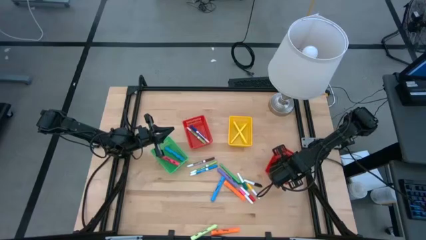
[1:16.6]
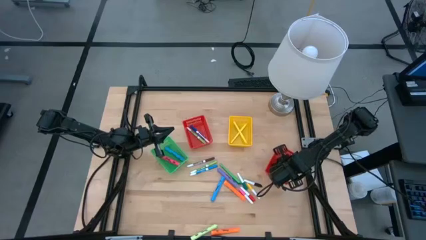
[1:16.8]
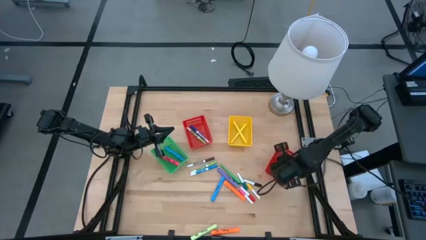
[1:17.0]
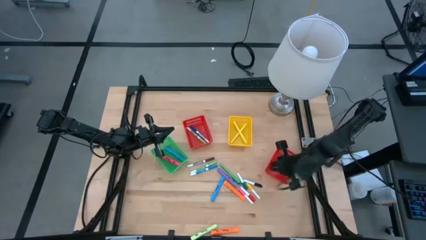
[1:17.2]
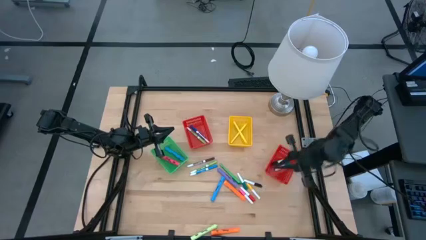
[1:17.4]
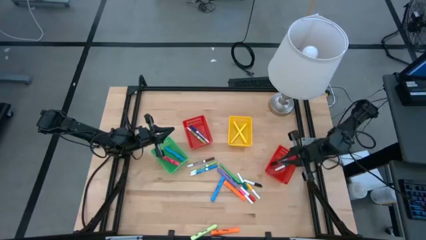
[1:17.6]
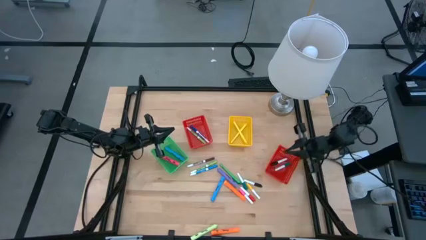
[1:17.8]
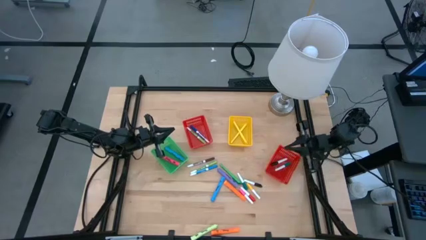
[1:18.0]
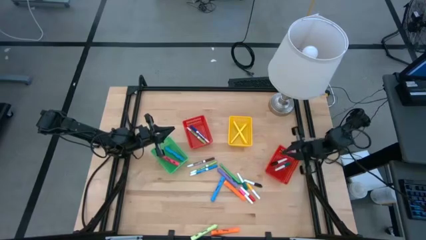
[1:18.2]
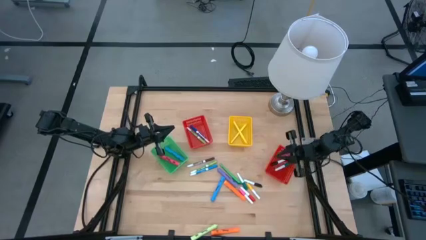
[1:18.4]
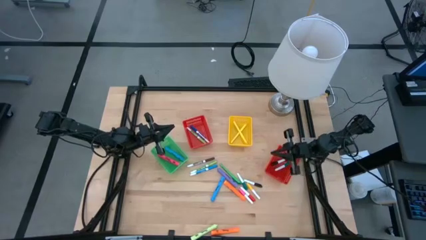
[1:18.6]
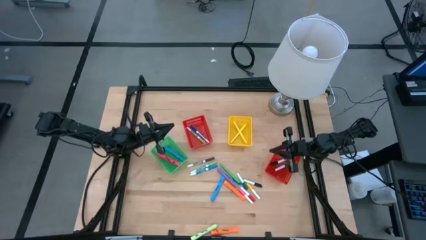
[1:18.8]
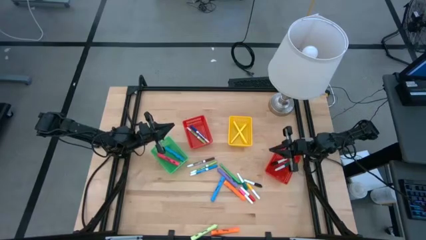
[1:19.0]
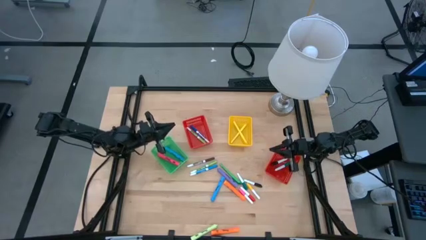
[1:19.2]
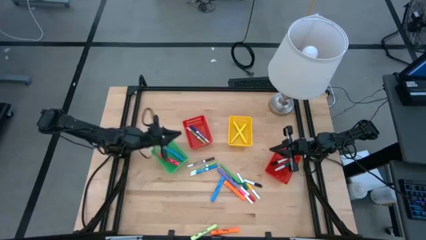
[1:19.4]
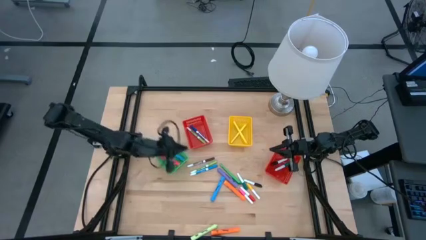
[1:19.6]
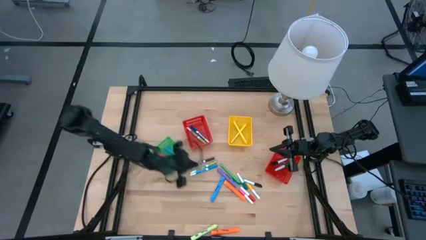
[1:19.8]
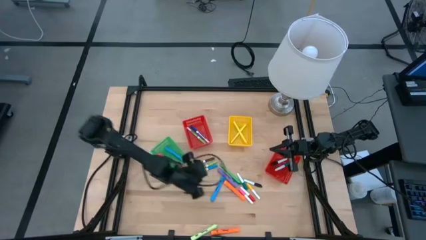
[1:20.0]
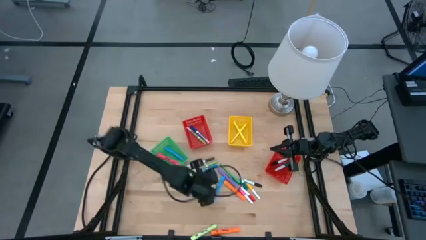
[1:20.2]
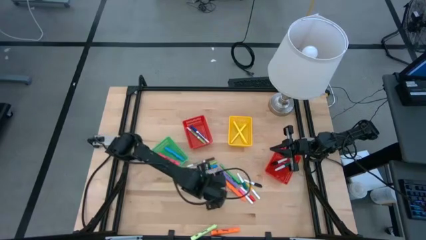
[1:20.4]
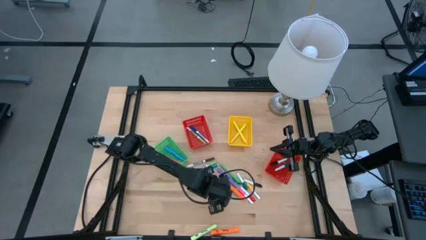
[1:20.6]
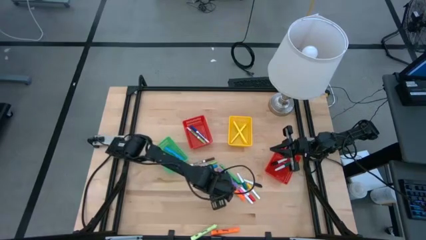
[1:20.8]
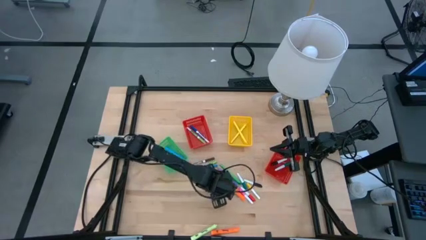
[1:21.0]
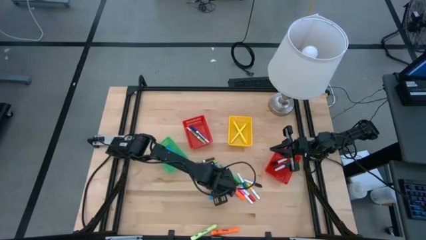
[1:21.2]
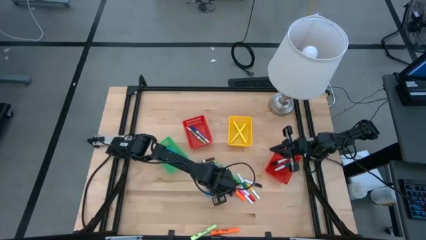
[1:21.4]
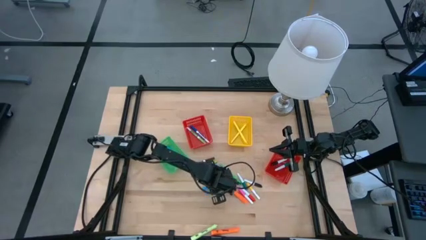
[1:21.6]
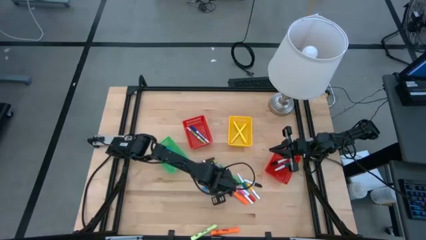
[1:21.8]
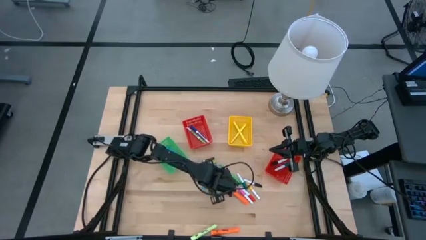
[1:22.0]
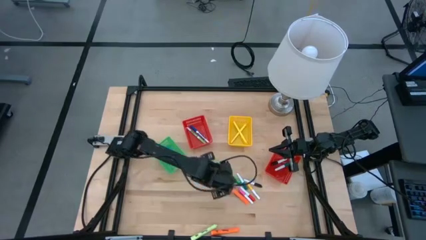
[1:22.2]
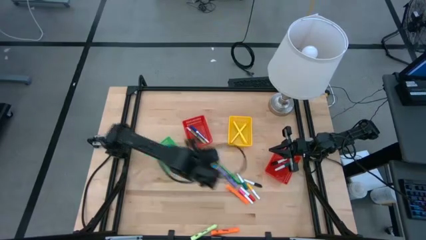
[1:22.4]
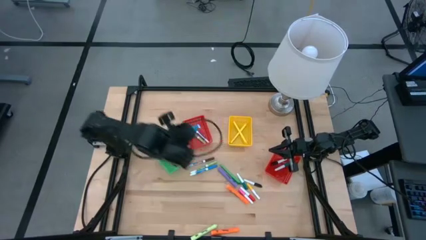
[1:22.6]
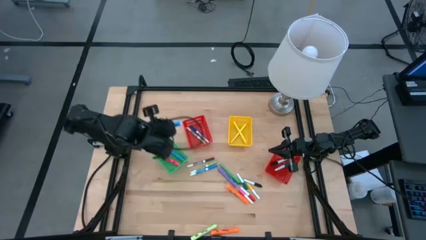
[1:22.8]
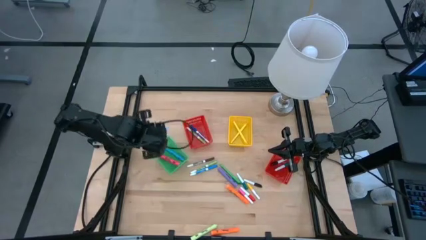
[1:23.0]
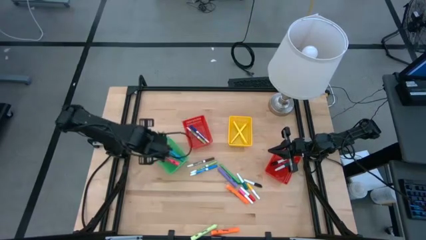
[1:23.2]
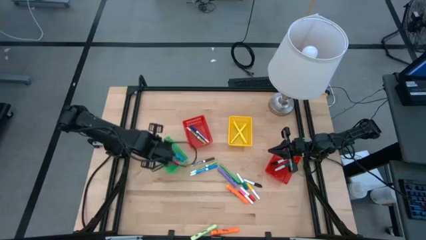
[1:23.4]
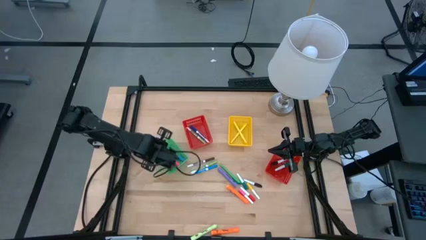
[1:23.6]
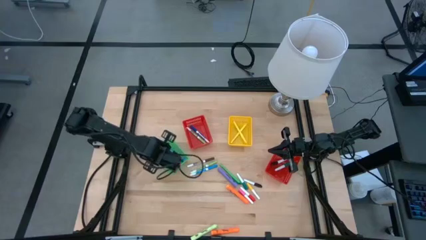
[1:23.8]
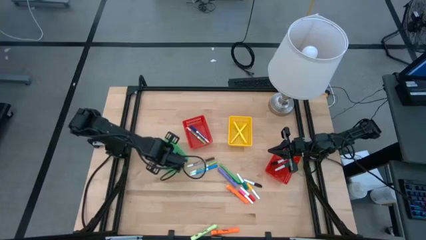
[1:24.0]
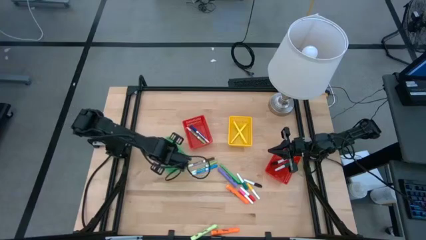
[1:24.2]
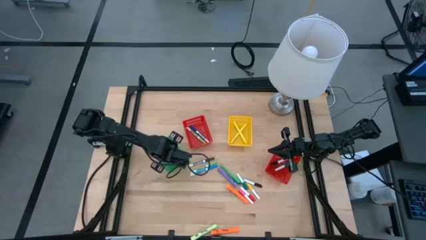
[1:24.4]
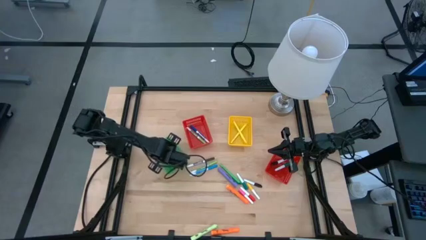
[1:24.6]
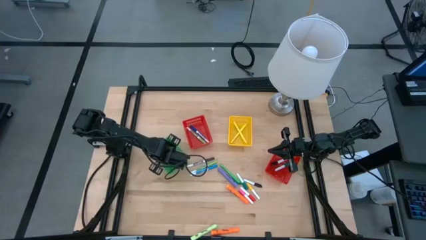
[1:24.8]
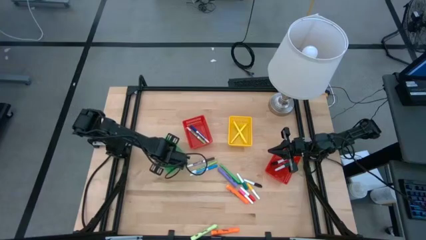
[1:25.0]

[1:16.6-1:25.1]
Task: Pick & Place Markers
Put the large blue highlighter pen into the green bin

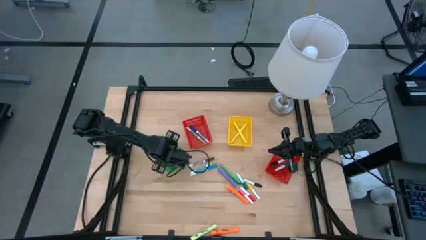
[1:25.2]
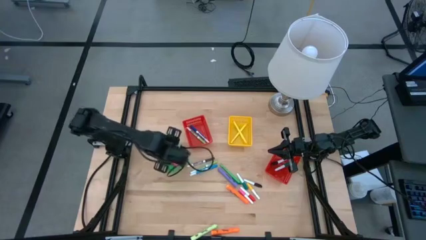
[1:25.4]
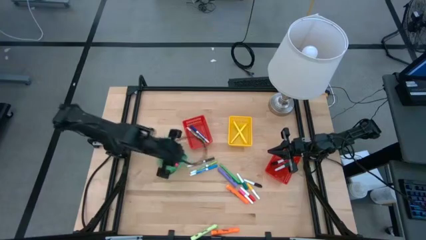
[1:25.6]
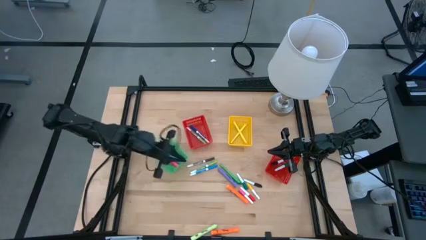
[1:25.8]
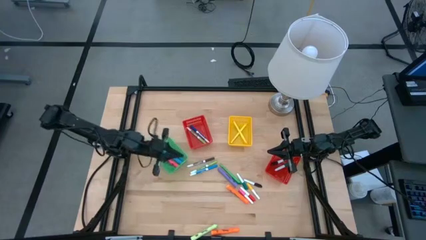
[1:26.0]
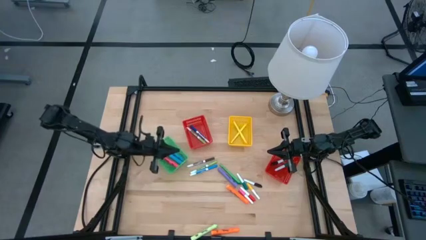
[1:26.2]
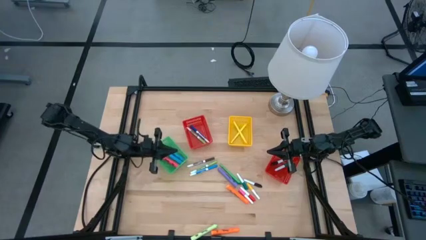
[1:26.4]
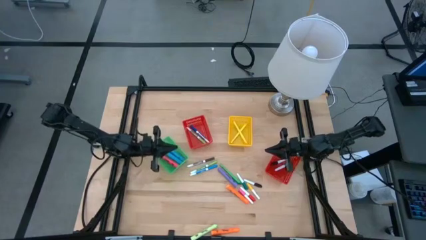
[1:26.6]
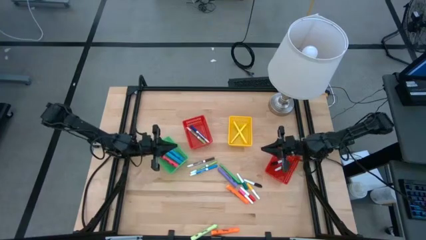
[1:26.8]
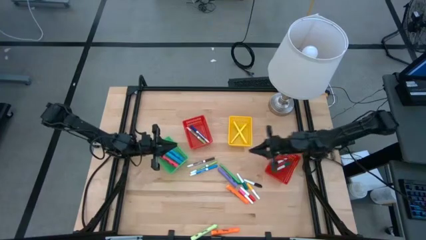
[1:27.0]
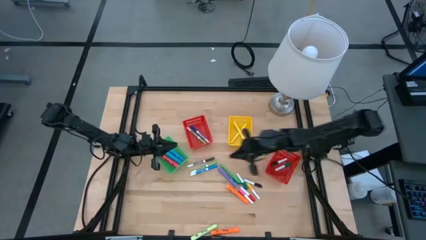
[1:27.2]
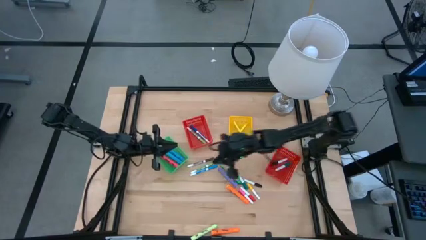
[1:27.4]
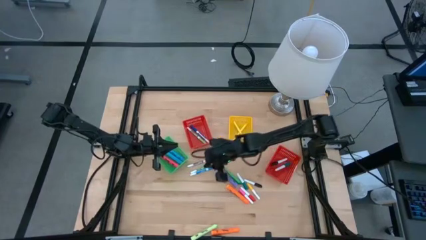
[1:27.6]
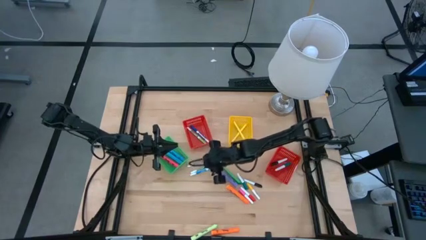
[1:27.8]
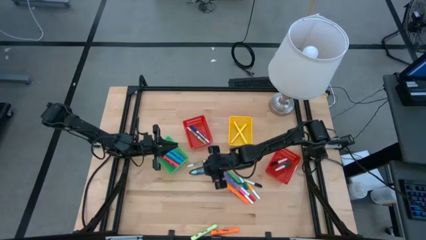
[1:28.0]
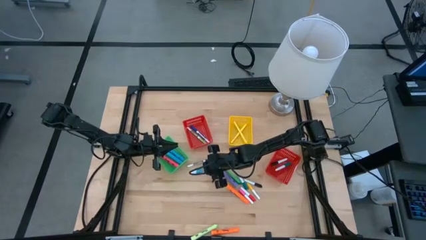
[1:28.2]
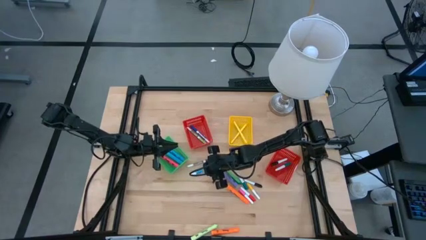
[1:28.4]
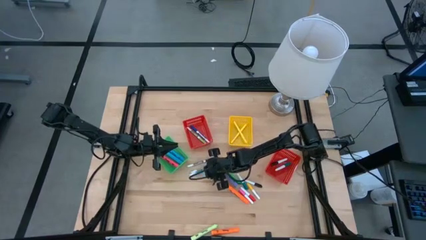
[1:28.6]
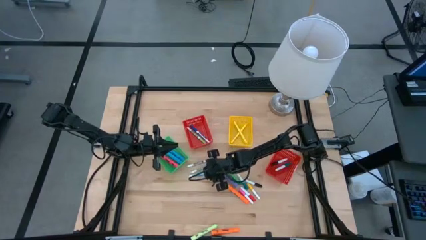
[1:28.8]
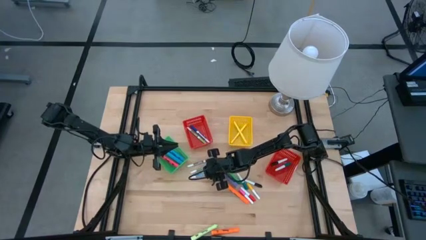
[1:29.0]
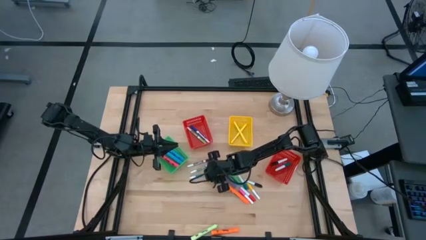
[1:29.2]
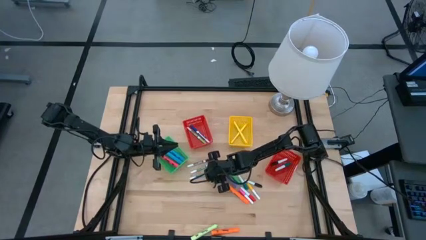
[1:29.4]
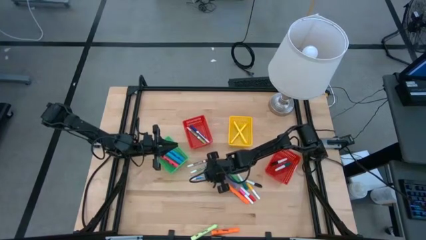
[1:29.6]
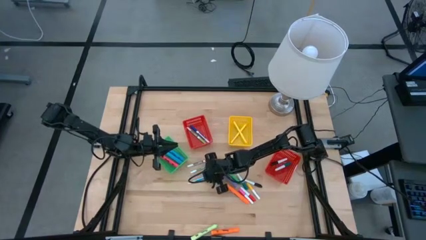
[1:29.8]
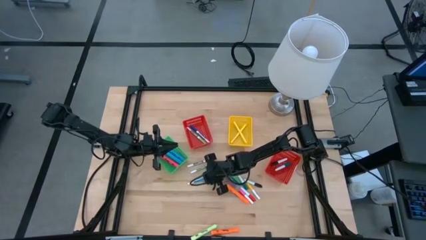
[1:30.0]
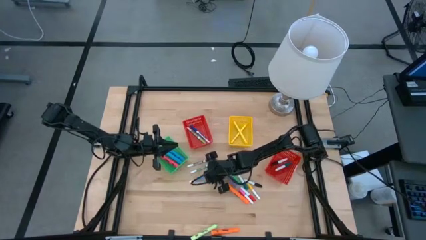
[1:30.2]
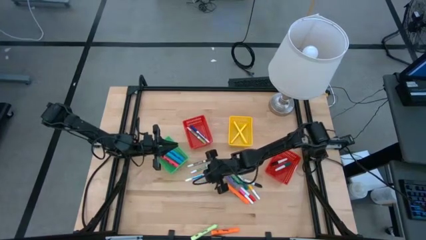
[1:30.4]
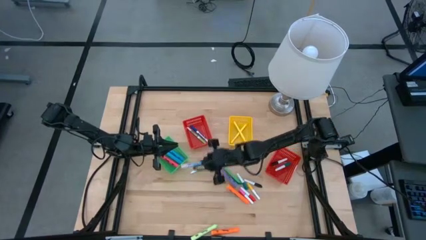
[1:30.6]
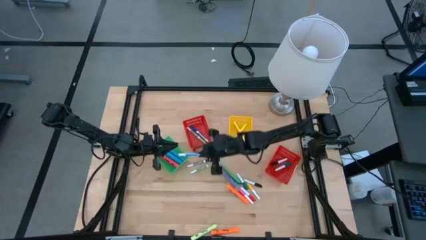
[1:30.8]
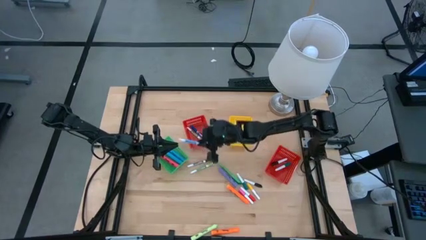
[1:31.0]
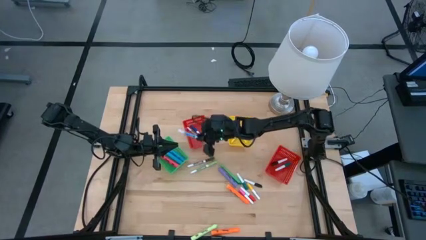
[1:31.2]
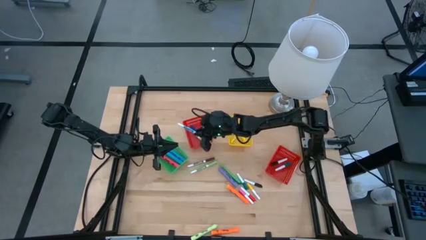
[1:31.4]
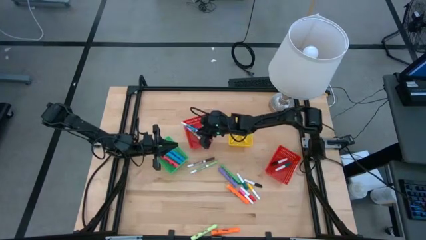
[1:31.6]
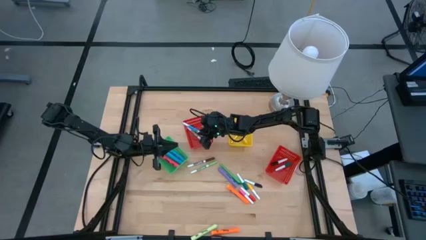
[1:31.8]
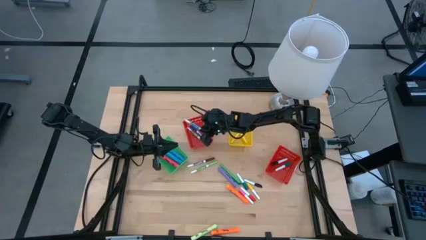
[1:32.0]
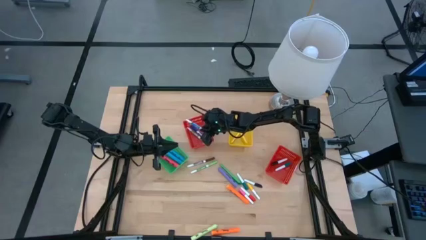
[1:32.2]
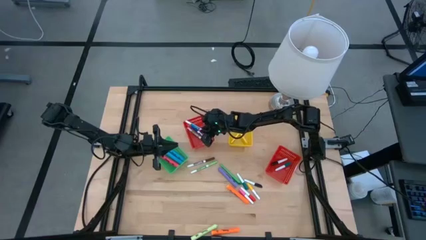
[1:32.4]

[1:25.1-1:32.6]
Put the blue marker pen into the left red bin
